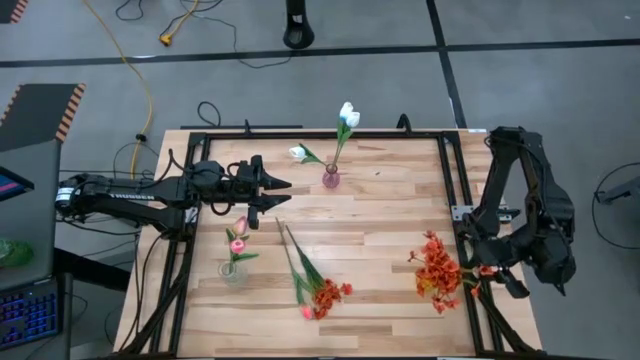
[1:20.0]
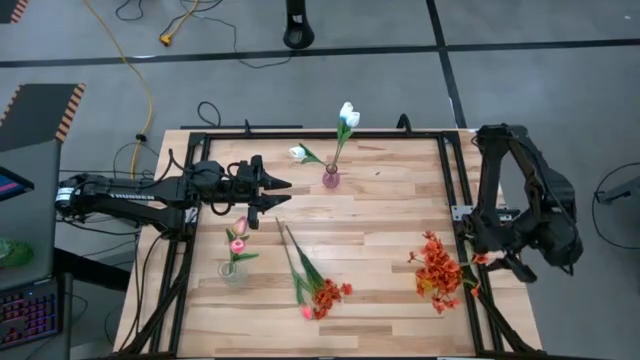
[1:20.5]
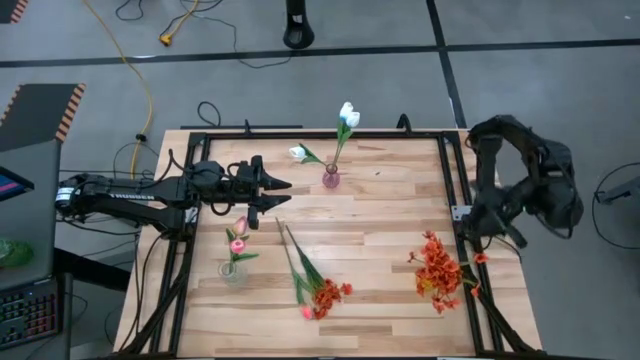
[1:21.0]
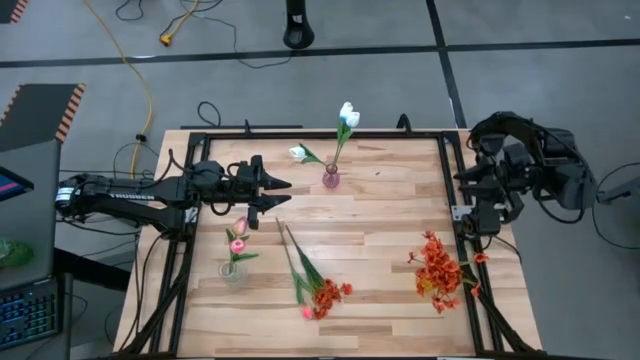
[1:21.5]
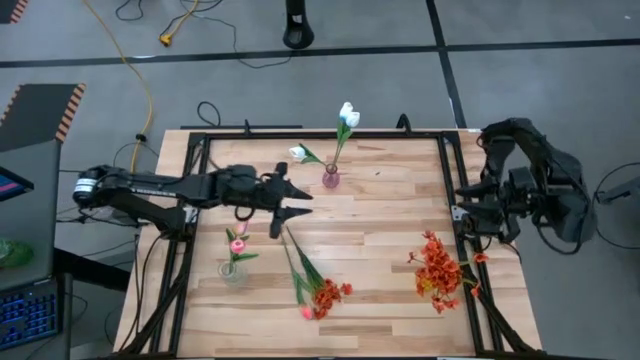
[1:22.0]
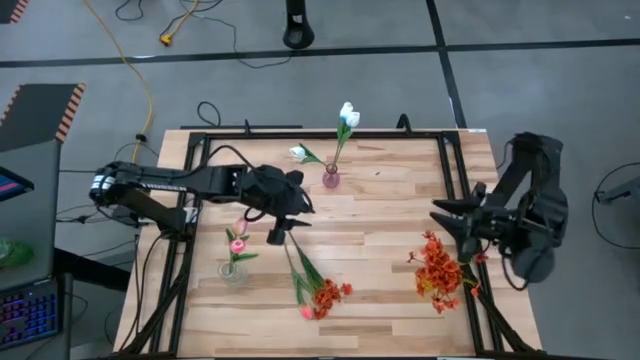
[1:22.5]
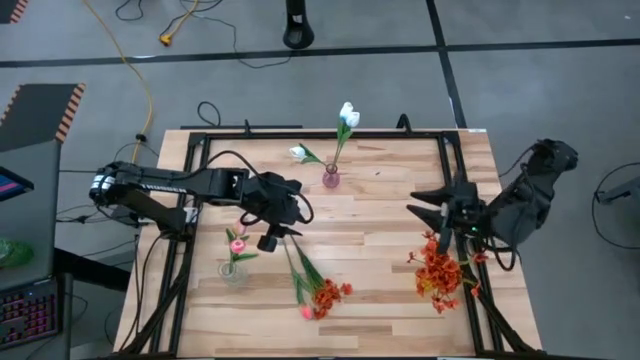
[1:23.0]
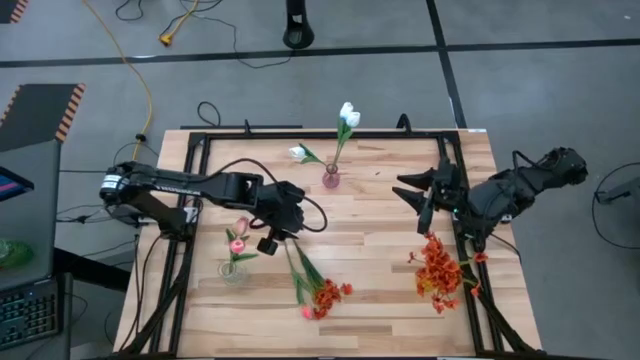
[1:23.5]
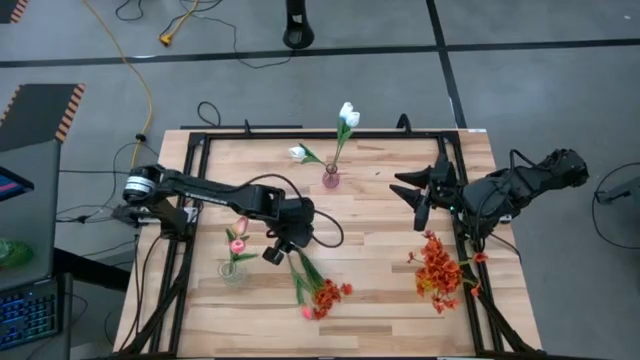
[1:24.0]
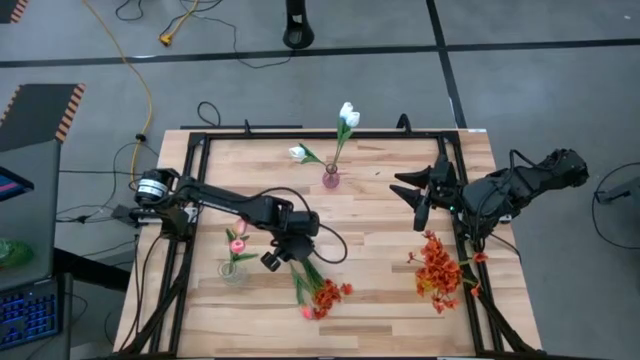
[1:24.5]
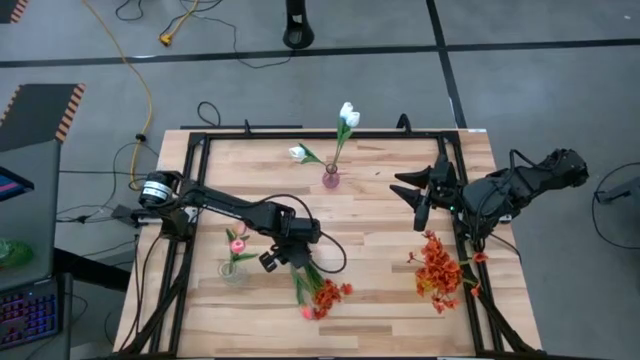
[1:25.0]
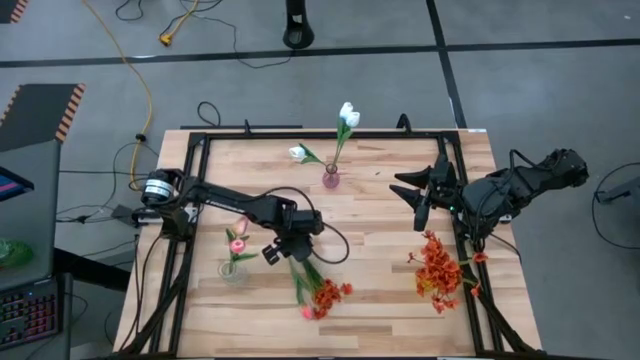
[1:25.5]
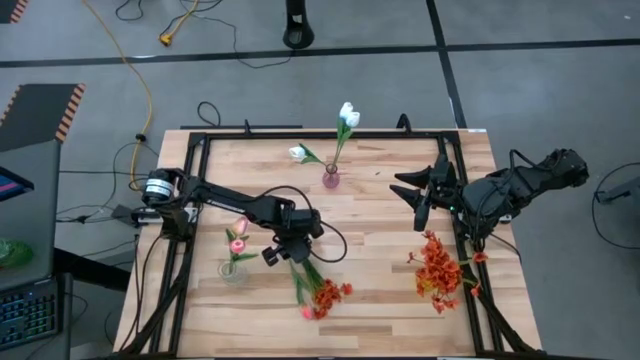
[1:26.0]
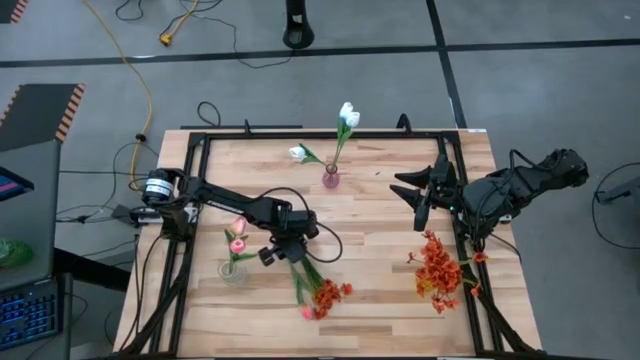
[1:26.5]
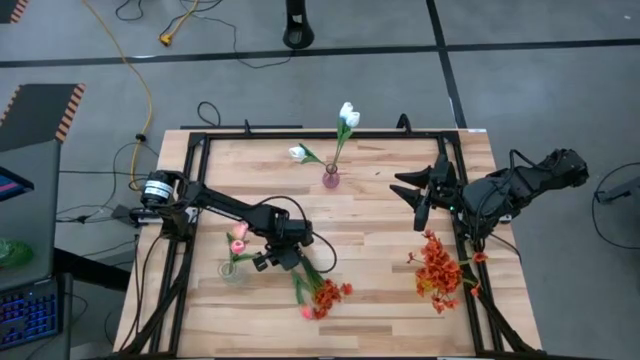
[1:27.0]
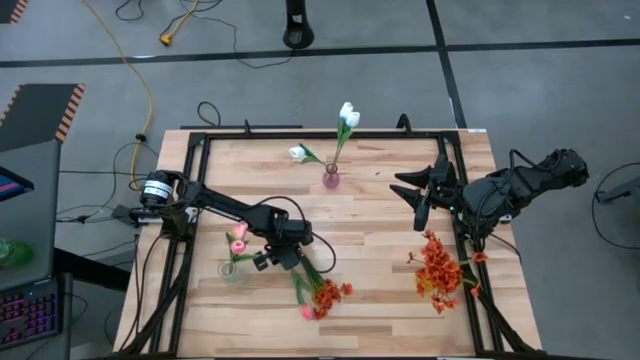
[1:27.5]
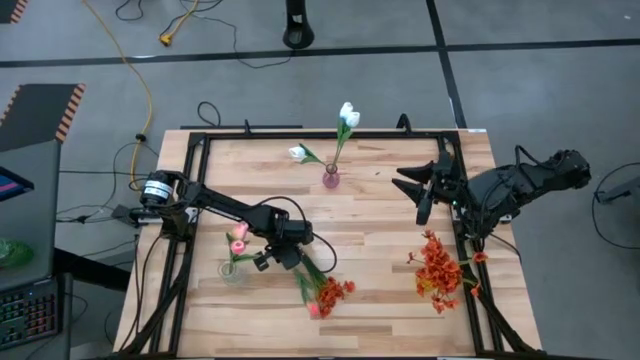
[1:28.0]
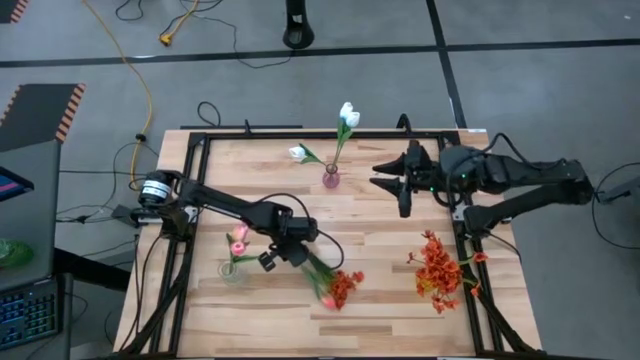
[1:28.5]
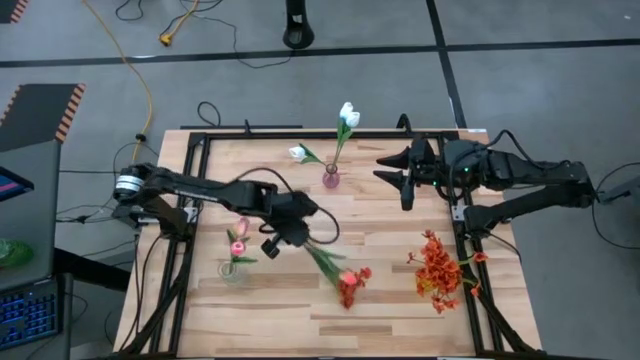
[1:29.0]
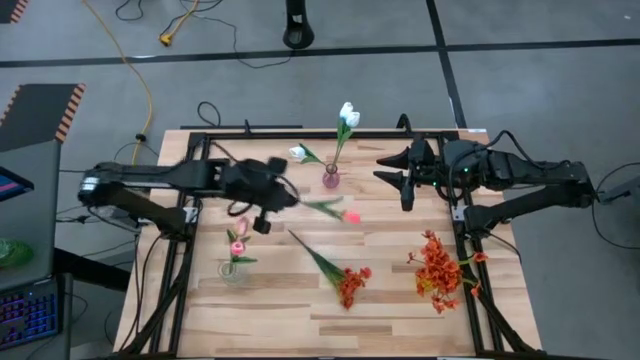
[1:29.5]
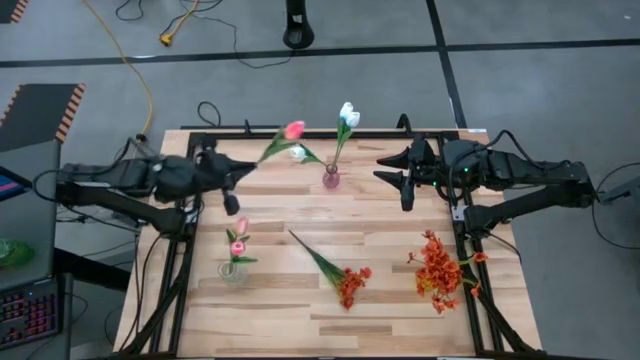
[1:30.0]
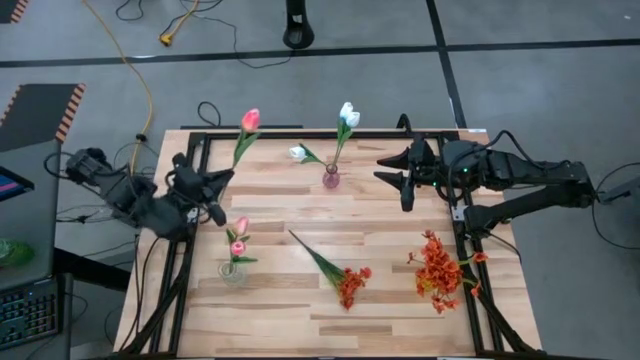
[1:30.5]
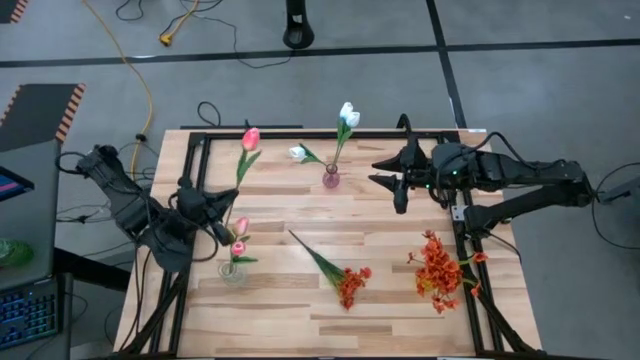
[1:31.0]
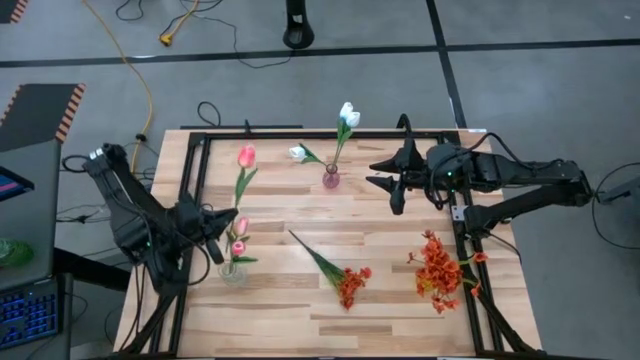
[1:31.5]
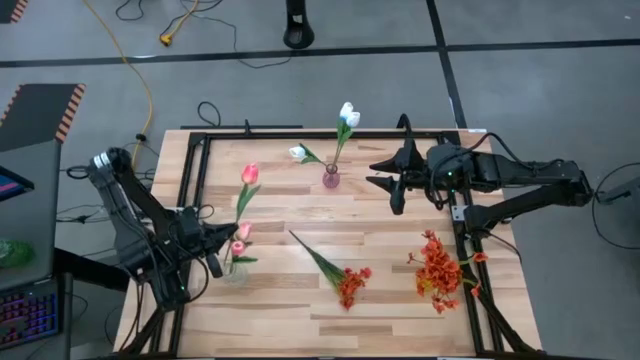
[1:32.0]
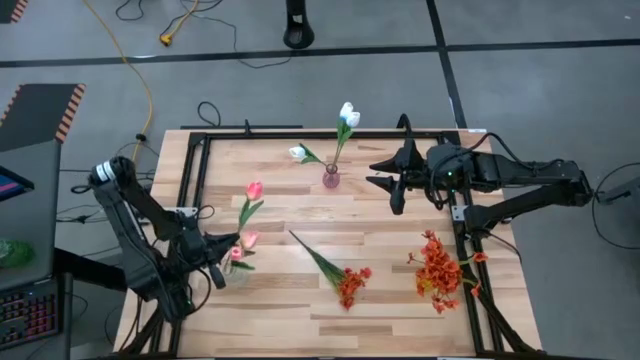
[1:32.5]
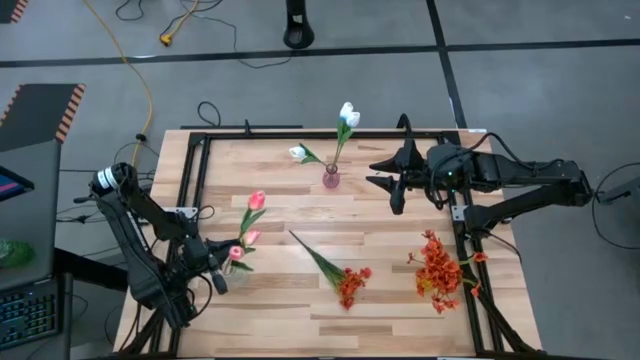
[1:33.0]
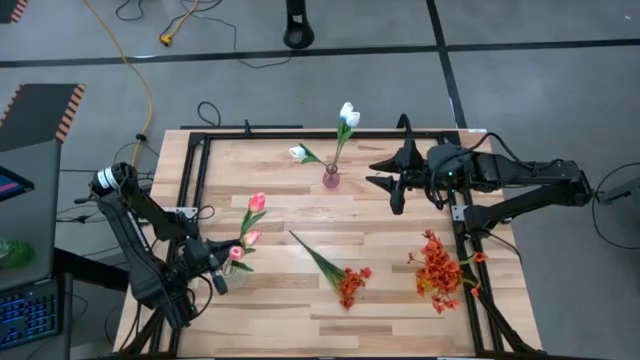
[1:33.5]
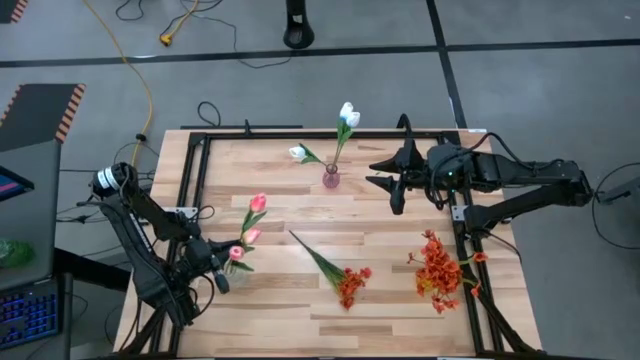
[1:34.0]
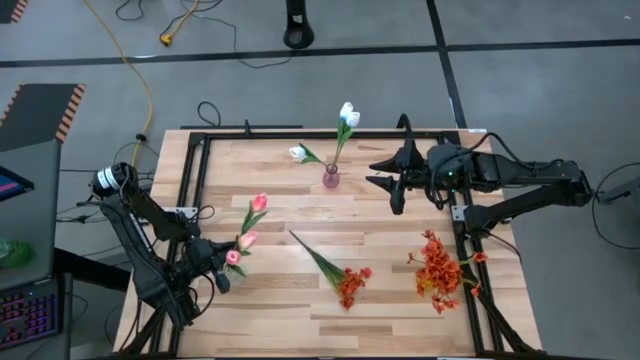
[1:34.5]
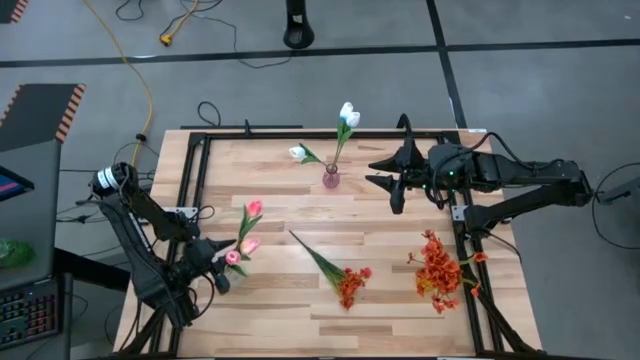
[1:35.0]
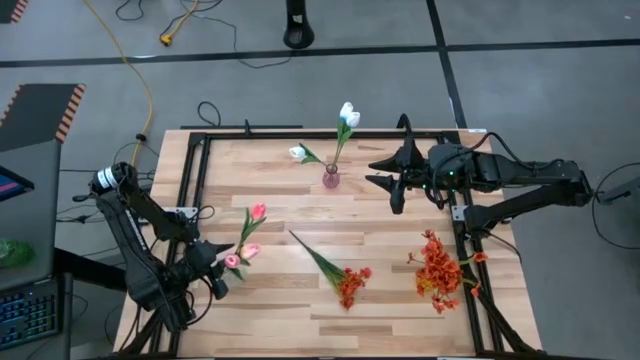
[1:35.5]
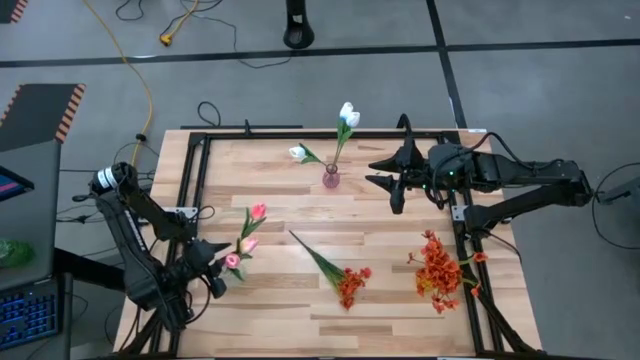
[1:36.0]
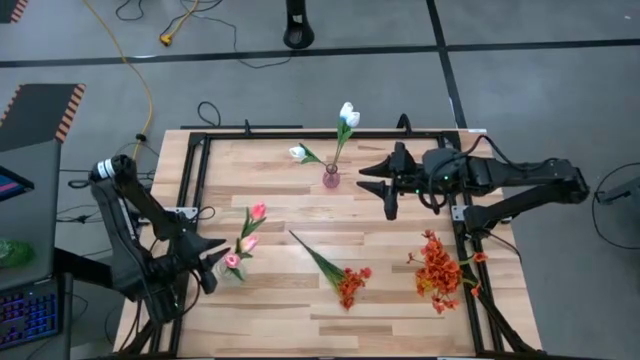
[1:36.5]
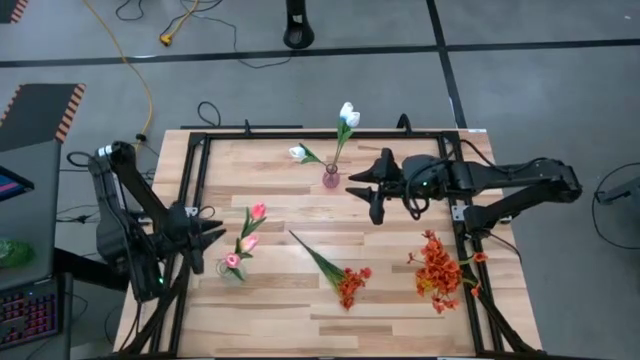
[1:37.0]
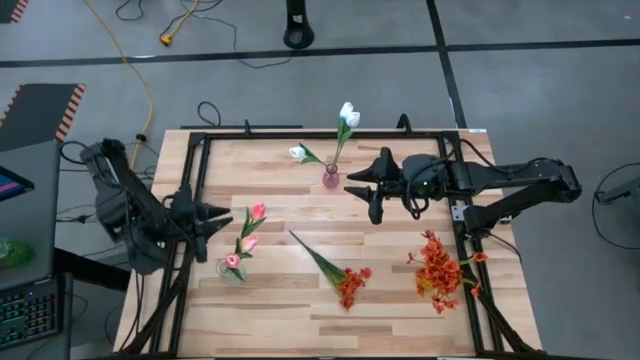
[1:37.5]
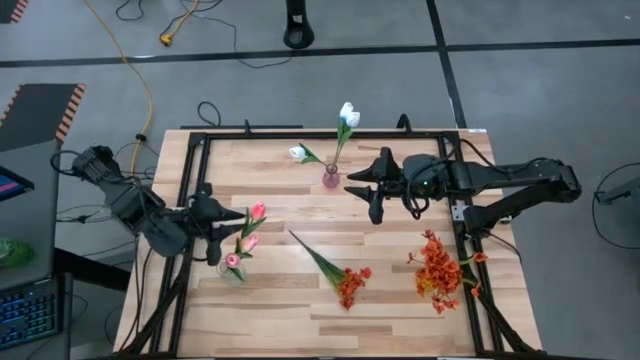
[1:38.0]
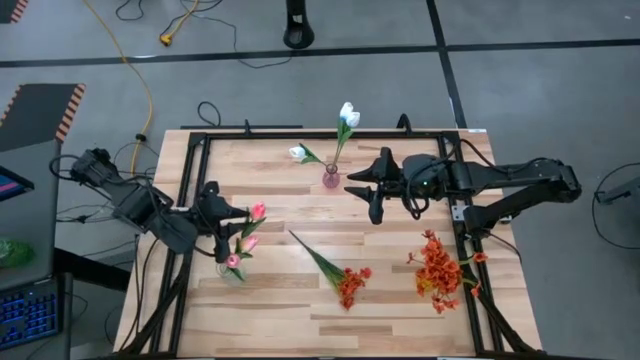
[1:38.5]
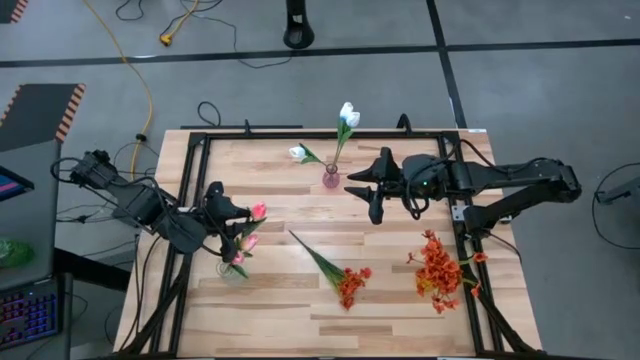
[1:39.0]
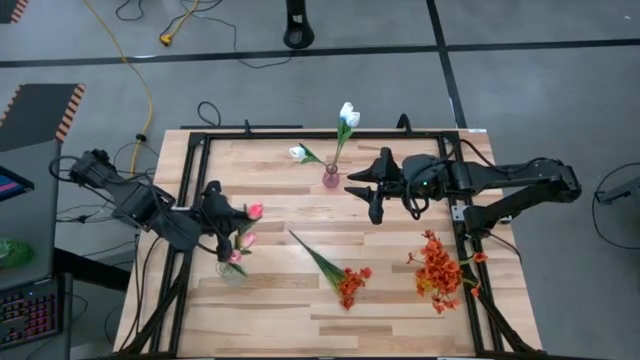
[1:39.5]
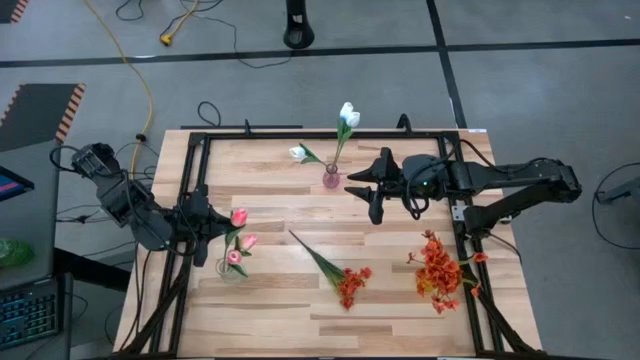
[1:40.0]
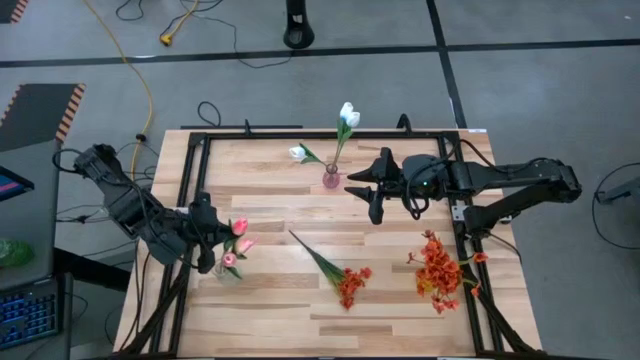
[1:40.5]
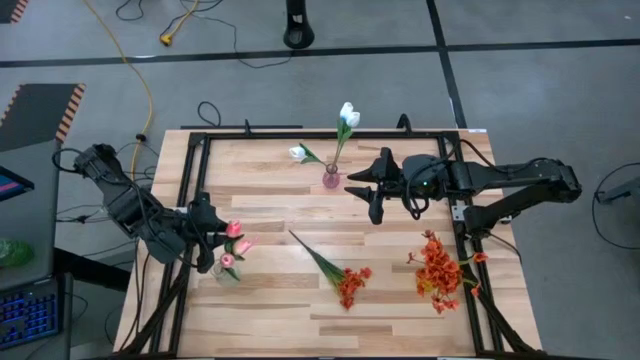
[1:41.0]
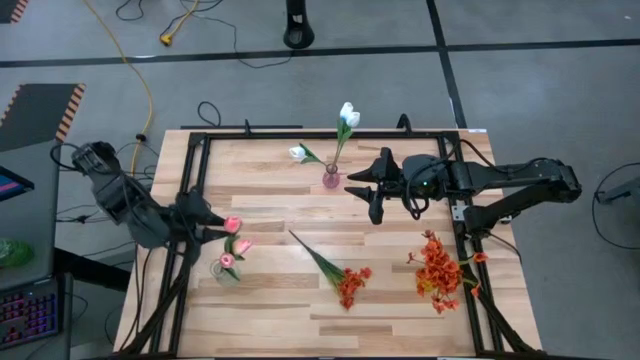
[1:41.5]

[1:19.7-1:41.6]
Task: Sort flowers into vase by color
Put the pink flower into the transparent vase
